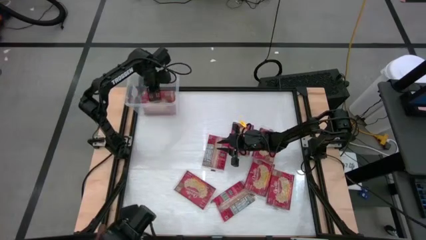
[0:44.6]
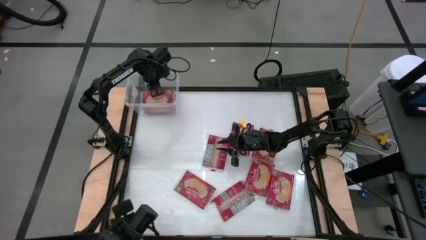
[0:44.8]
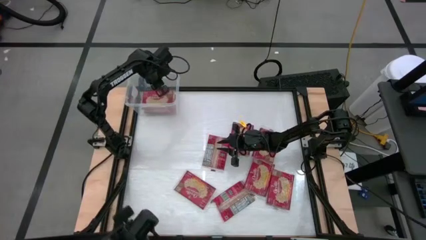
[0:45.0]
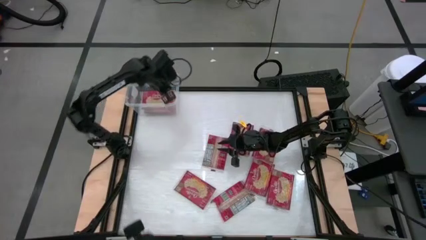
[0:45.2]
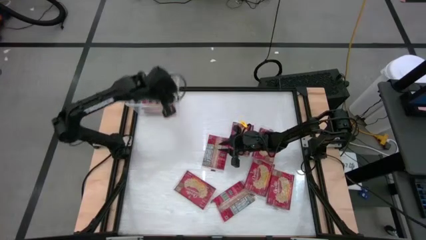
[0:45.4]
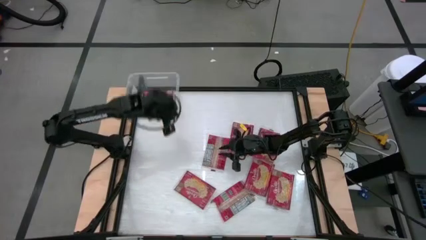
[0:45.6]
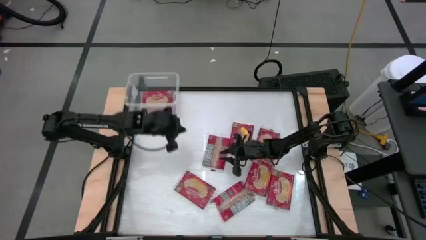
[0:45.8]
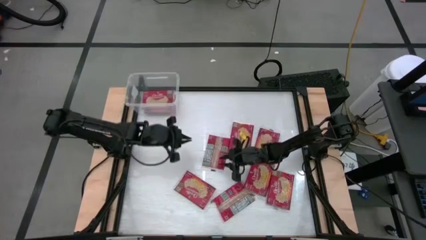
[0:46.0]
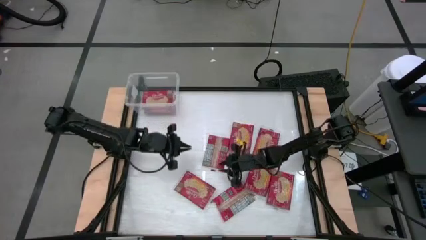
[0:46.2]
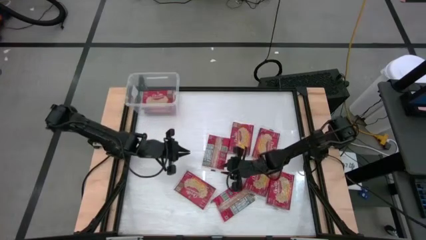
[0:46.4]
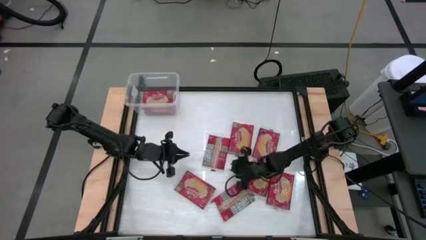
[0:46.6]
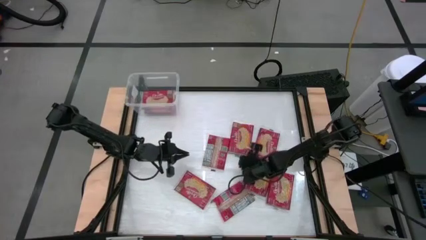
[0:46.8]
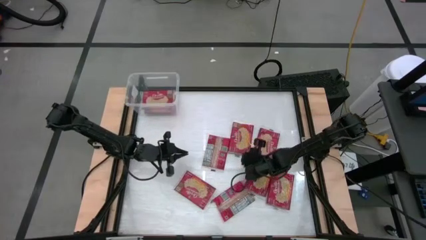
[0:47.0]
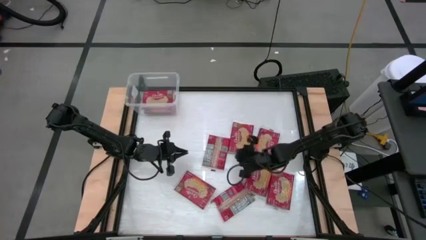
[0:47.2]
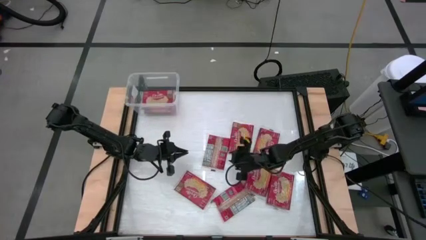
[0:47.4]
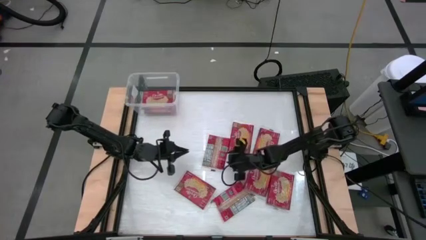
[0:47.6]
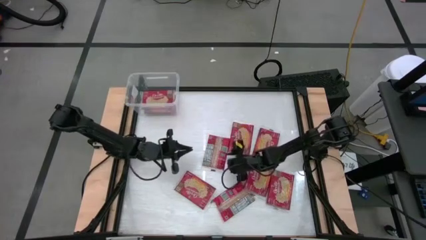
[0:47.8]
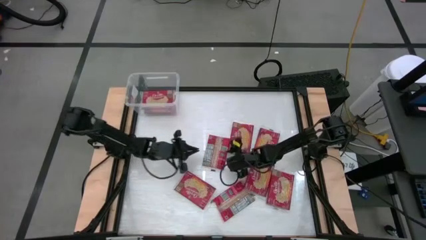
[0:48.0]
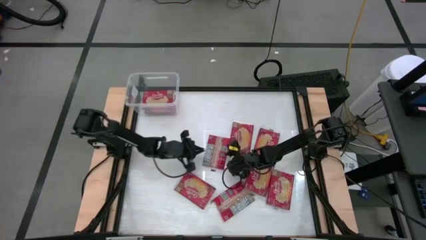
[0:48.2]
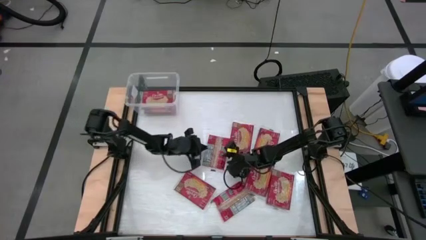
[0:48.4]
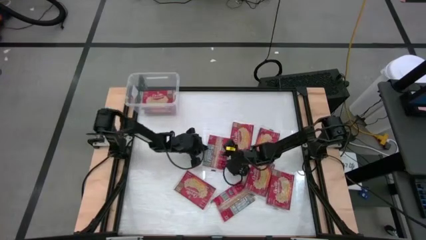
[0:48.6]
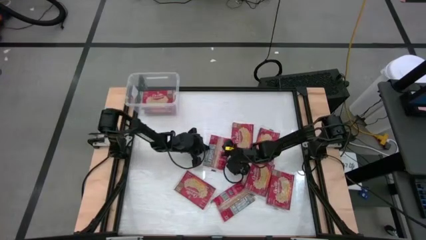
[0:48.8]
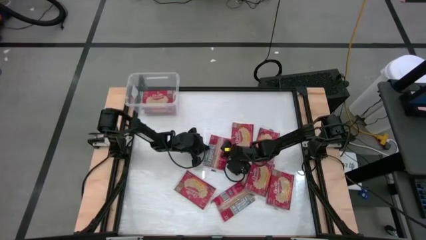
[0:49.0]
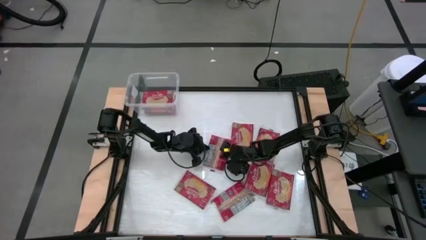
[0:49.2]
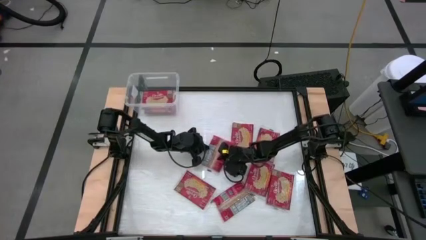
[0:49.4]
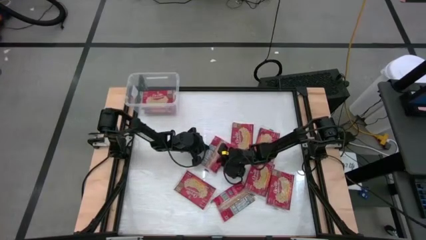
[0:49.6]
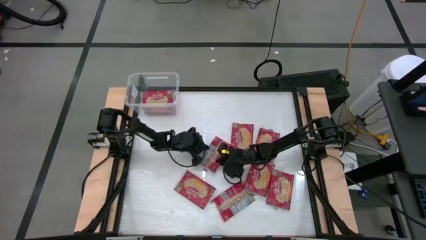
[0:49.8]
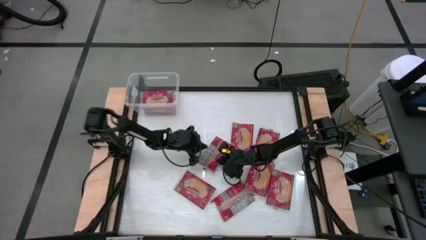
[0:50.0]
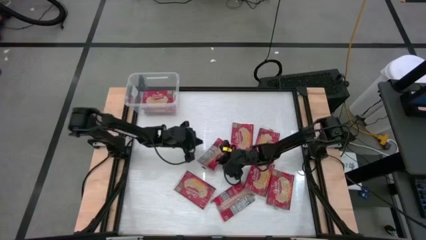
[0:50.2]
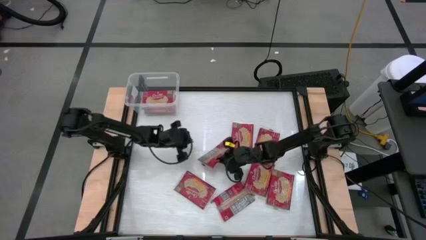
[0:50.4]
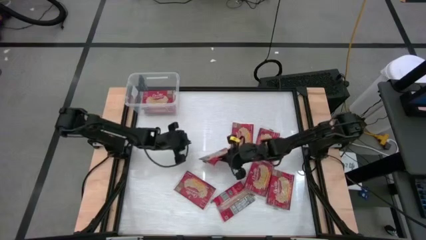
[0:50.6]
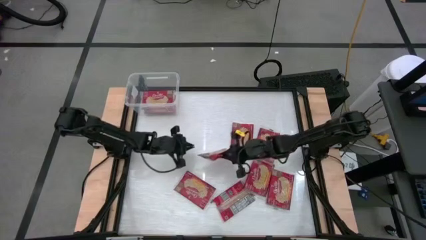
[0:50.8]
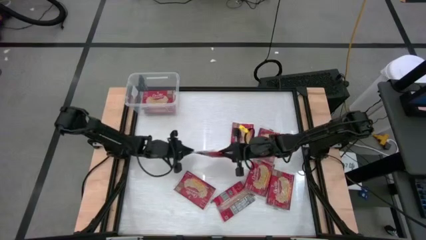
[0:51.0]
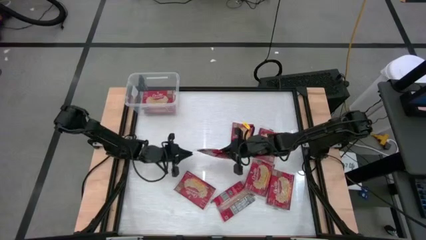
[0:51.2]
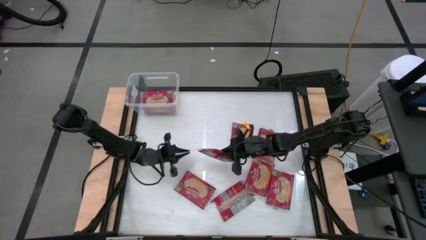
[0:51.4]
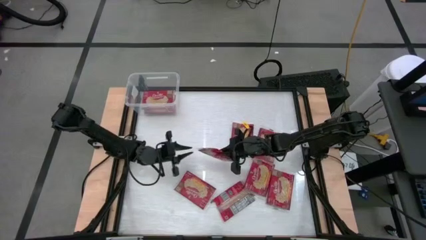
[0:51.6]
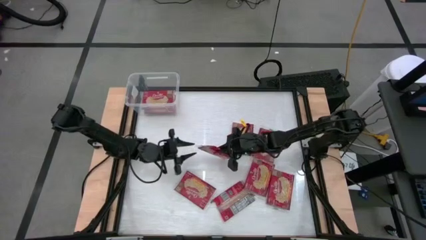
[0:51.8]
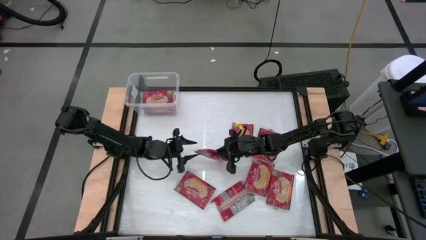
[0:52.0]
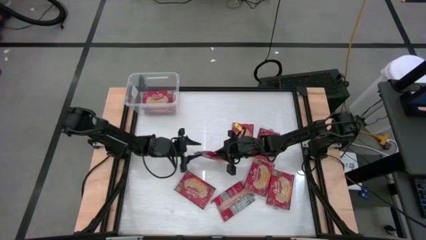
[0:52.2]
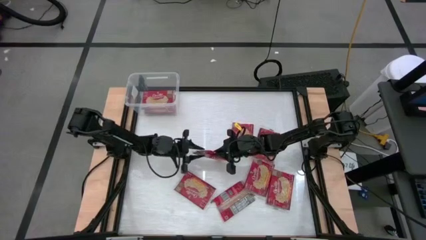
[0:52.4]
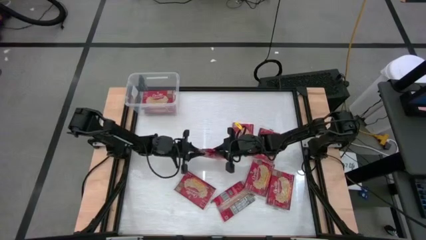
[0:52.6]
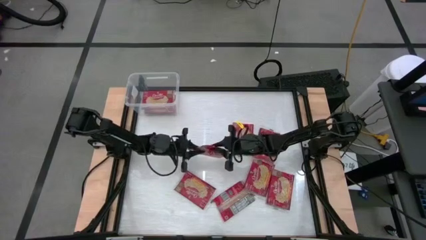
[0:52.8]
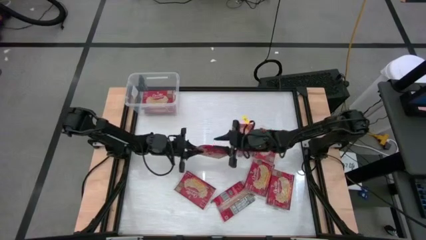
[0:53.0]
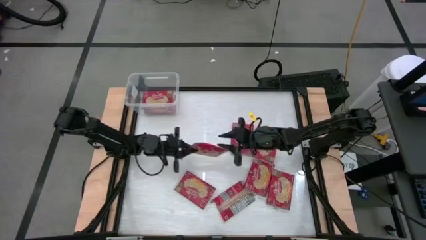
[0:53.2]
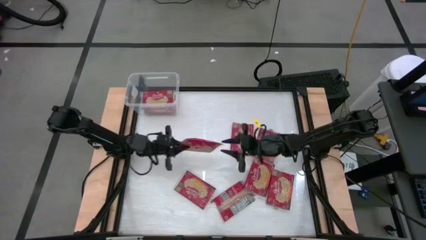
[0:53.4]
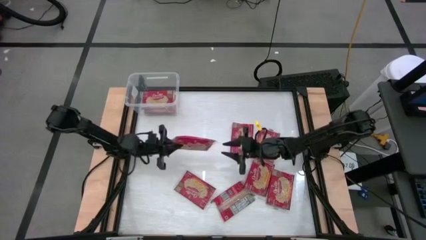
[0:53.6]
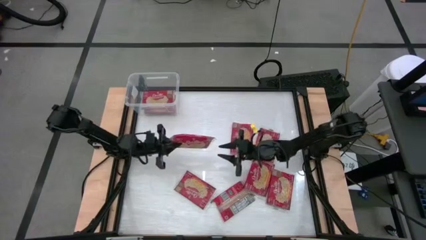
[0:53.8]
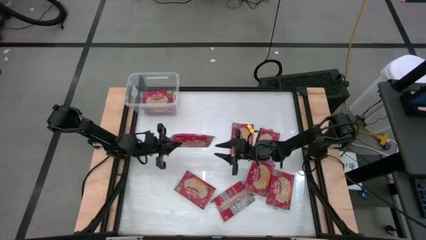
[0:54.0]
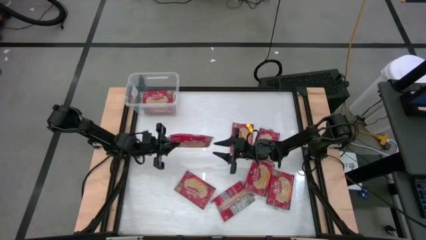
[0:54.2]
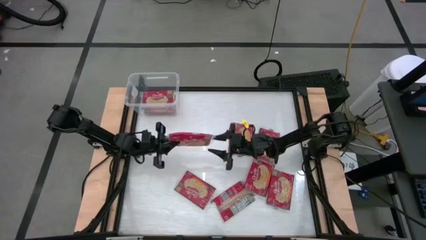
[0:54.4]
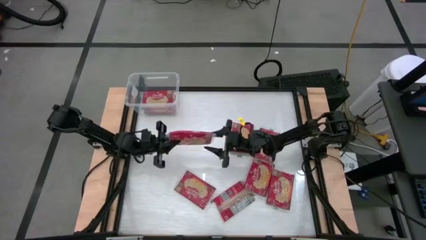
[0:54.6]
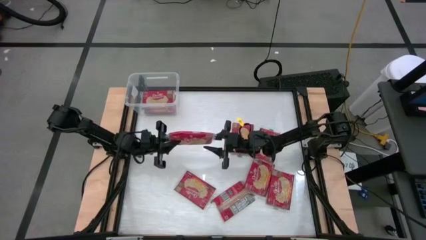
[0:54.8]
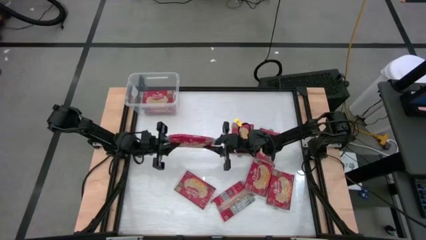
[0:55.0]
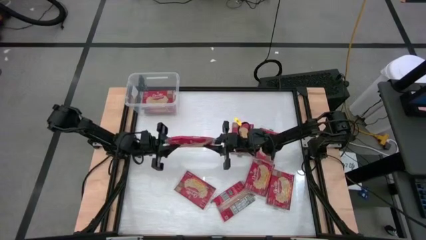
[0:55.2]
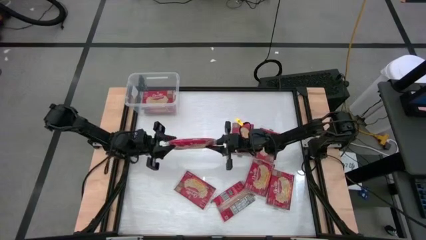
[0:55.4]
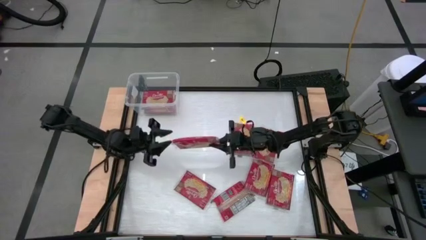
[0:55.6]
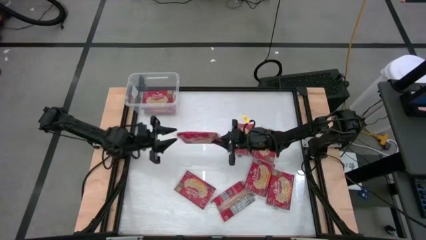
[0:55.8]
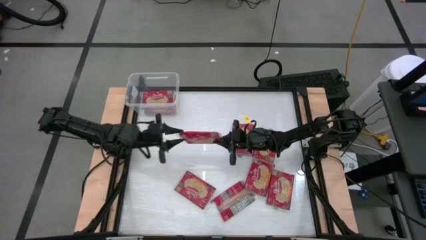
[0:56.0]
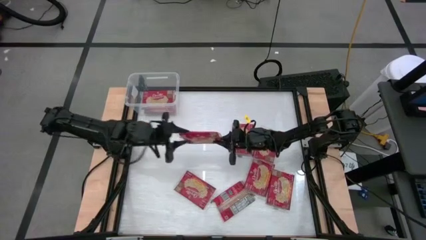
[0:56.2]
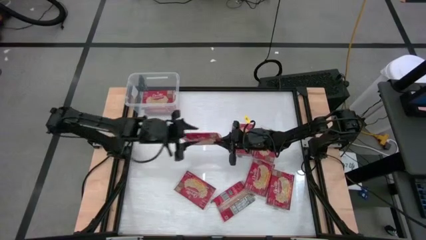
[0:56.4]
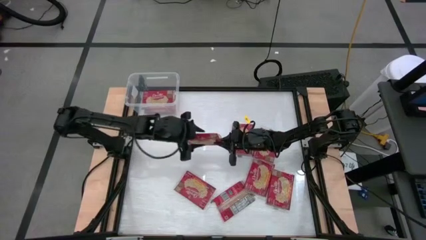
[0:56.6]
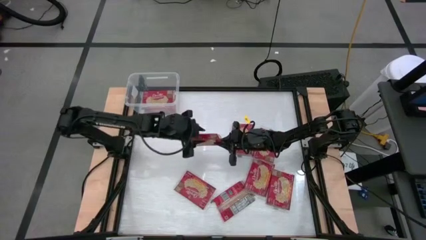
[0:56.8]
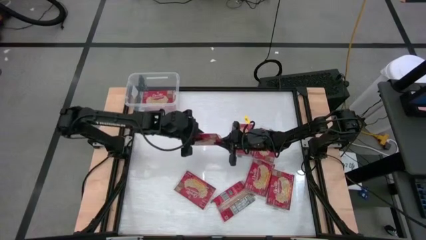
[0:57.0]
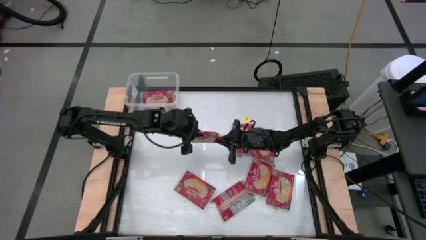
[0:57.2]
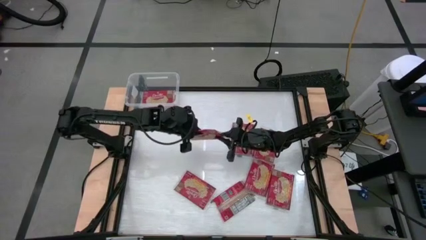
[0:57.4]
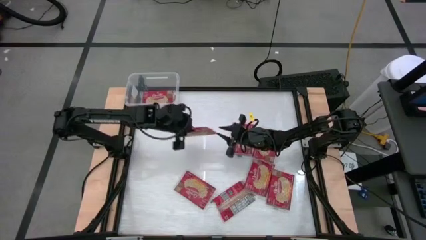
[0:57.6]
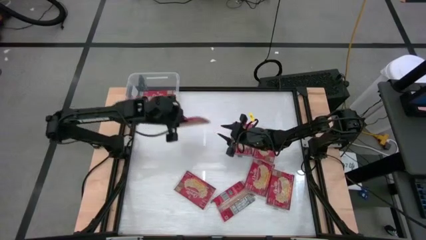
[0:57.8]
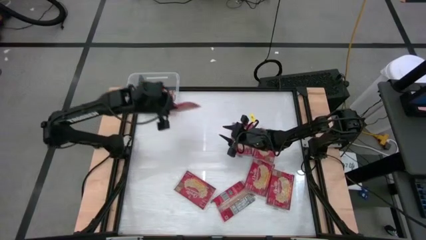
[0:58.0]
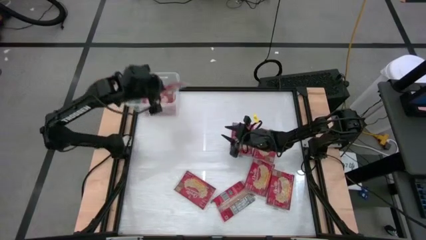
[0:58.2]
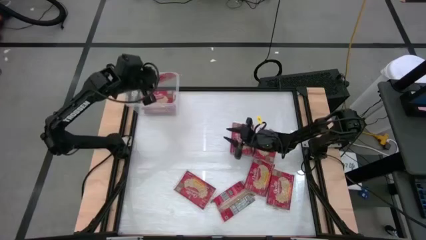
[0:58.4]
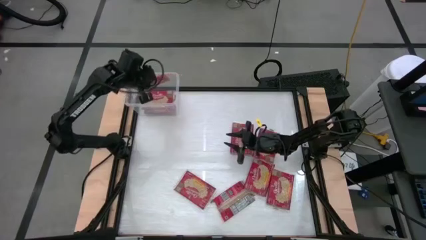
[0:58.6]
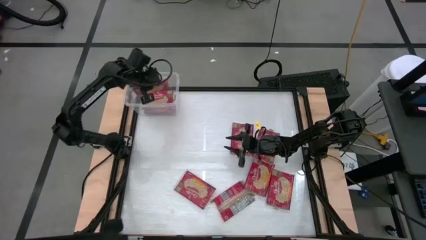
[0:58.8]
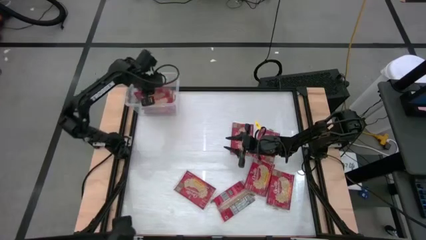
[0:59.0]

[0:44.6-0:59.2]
Task: Sort popcorn bags into baskets
Put the red popcorn bag into the transparent container

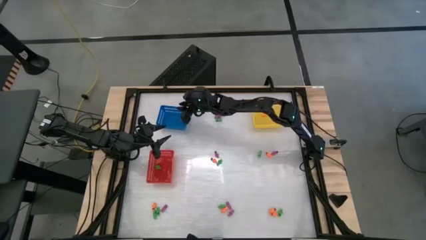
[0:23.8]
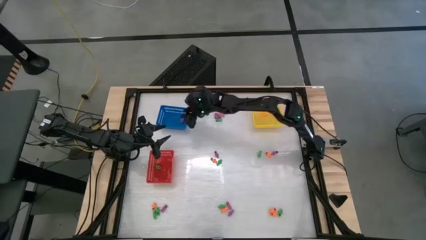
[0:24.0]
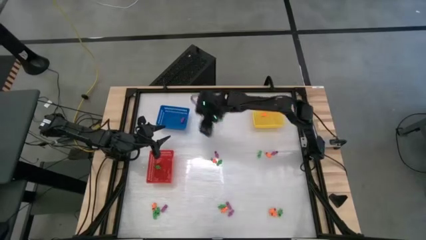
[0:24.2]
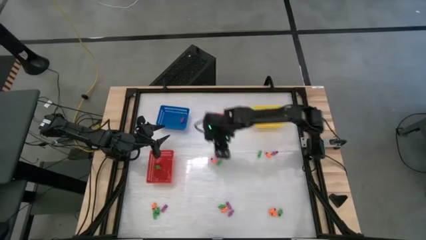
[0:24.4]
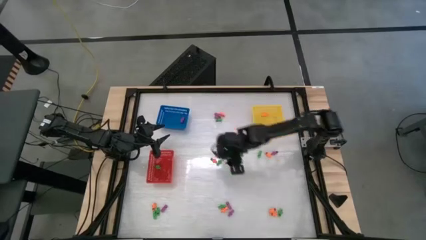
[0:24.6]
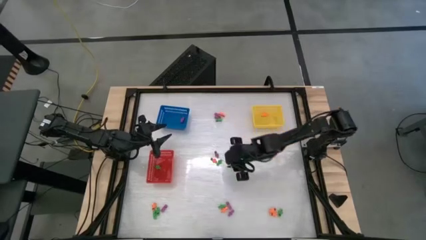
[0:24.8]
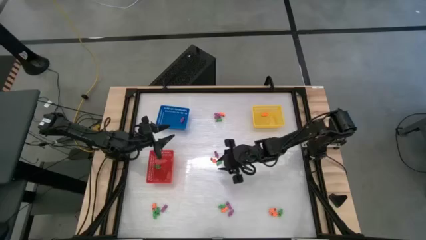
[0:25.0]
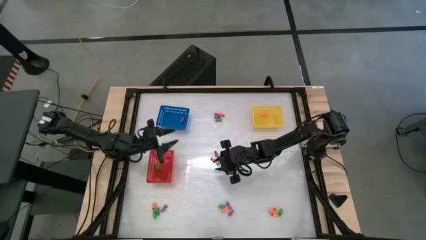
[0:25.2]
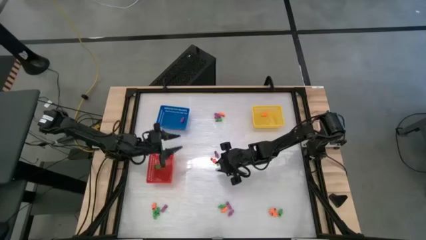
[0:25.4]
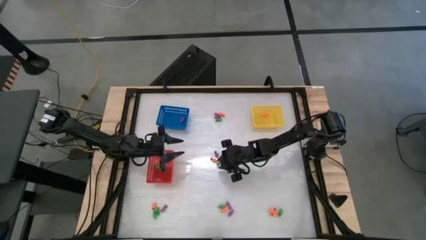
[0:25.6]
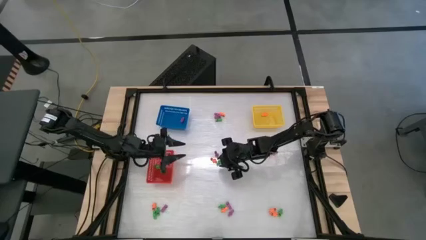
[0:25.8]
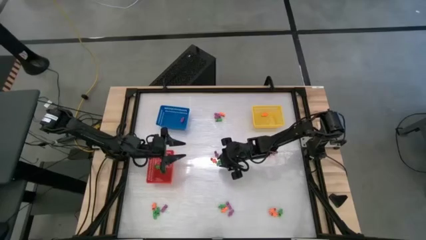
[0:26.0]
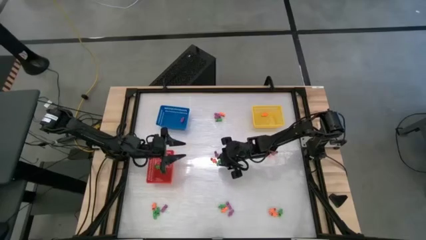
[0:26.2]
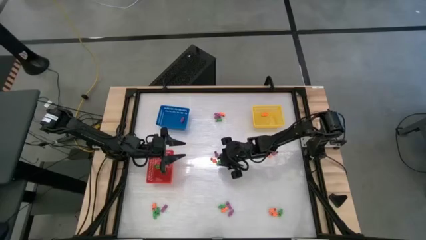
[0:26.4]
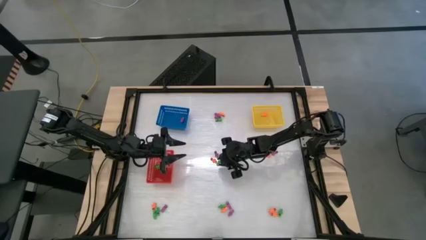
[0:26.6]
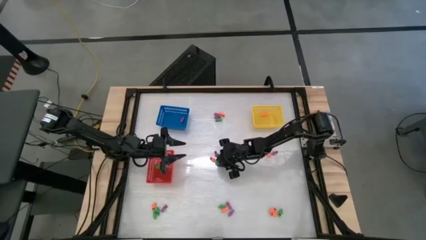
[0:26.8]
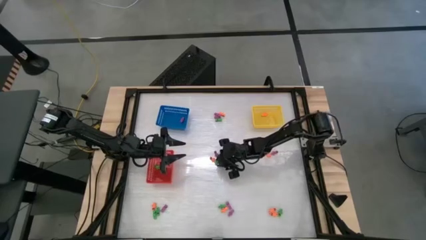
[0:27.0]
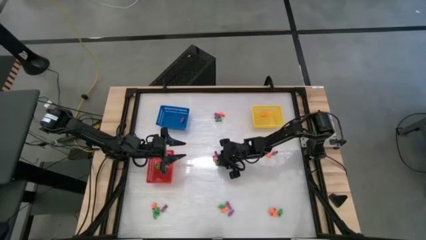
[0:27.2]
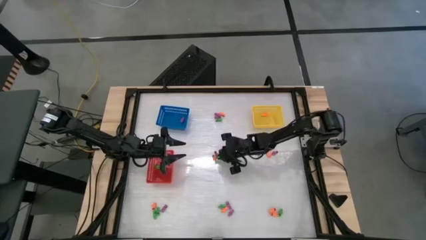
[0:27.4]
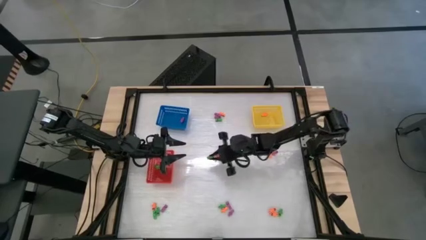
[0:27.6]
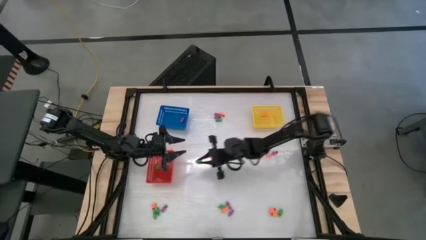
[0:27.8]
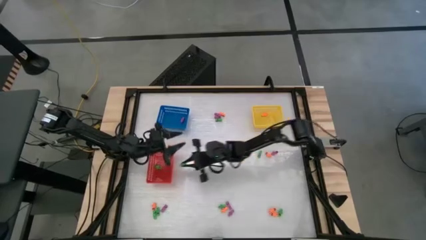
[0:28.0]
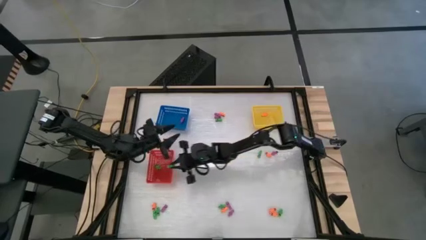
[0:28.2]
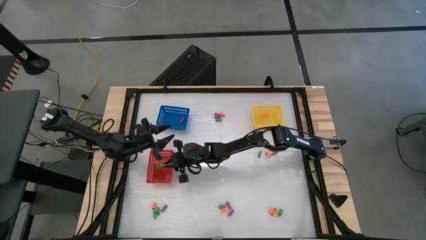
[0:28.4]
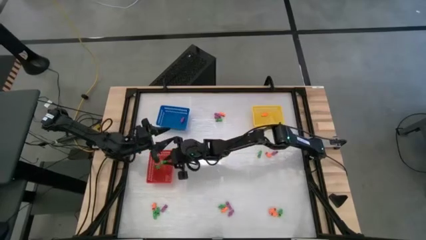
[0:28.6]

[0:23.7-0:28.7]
Task: Sort Halloween decoration
Put the green skeleton toy into the red bin
